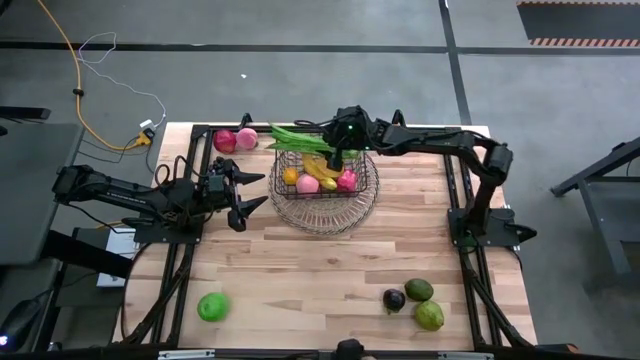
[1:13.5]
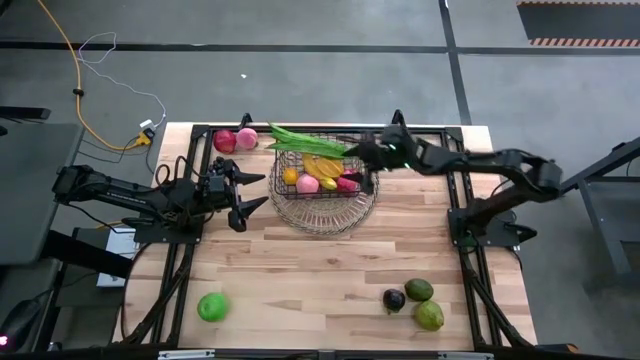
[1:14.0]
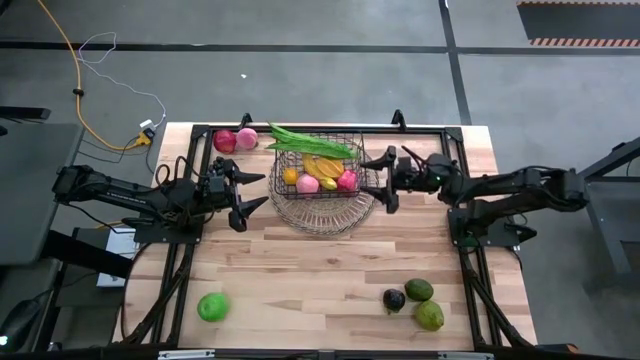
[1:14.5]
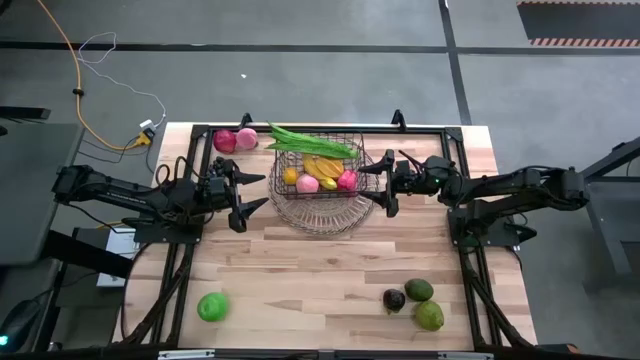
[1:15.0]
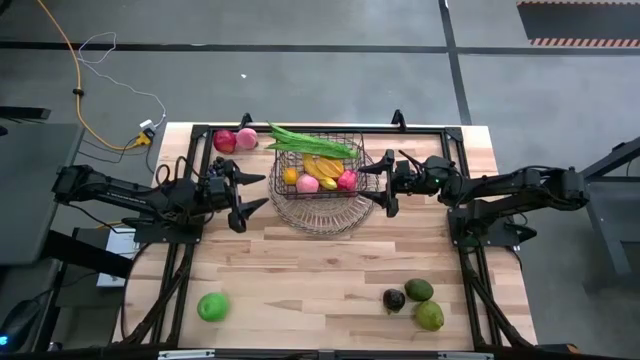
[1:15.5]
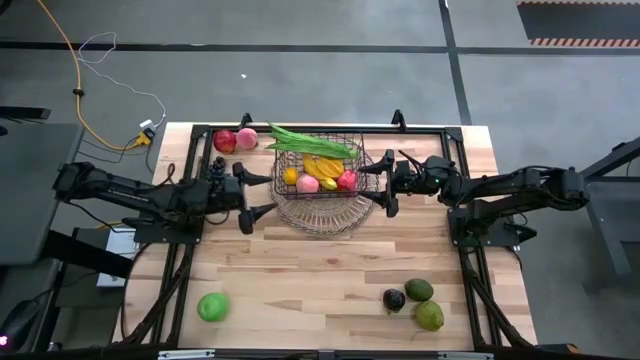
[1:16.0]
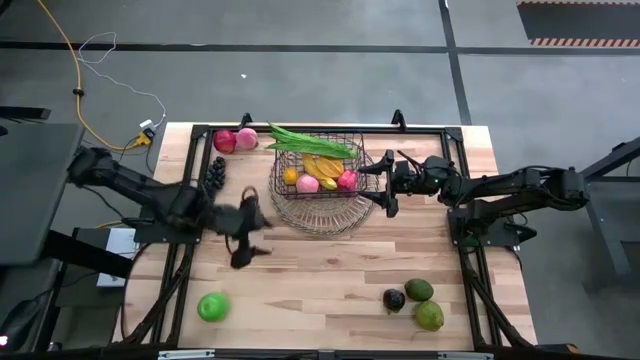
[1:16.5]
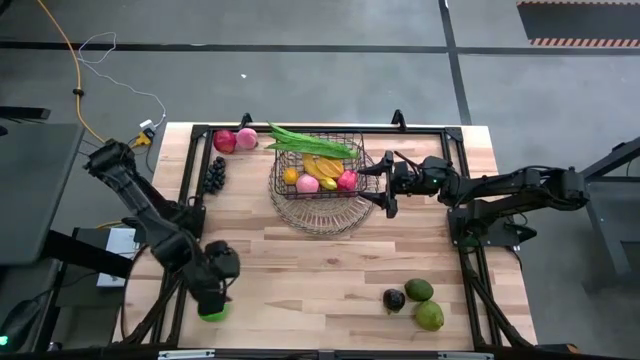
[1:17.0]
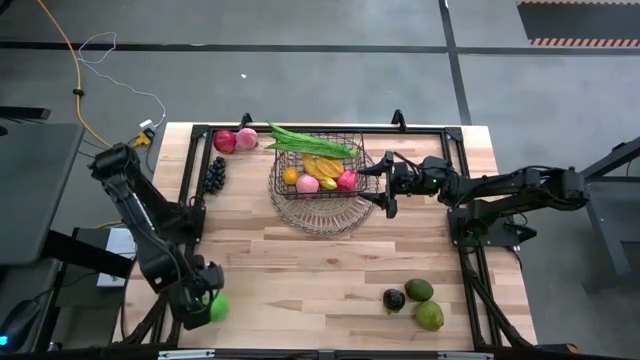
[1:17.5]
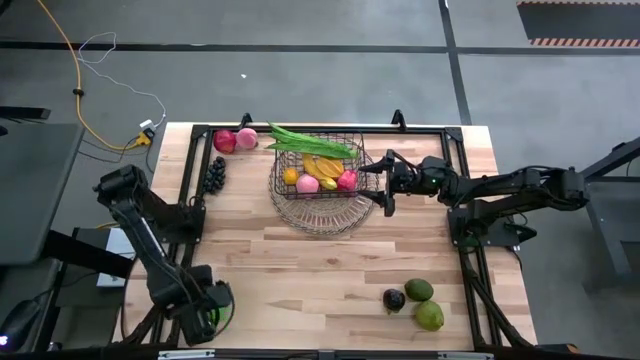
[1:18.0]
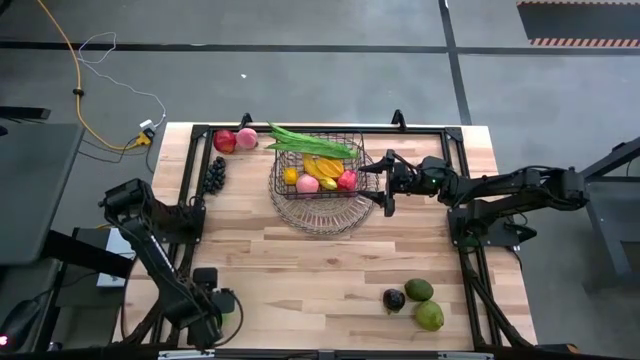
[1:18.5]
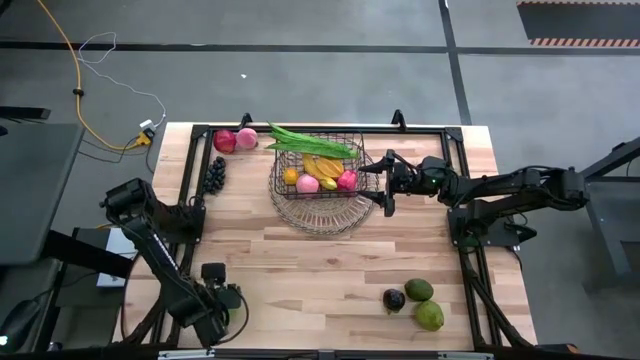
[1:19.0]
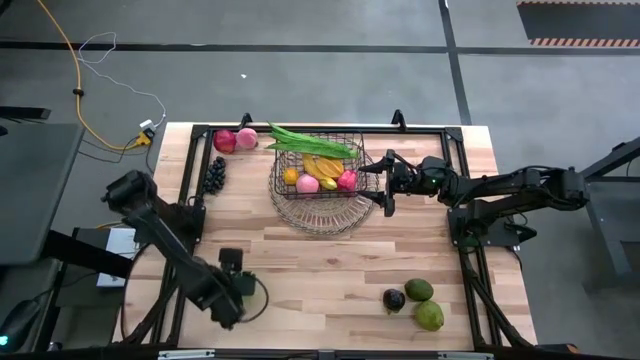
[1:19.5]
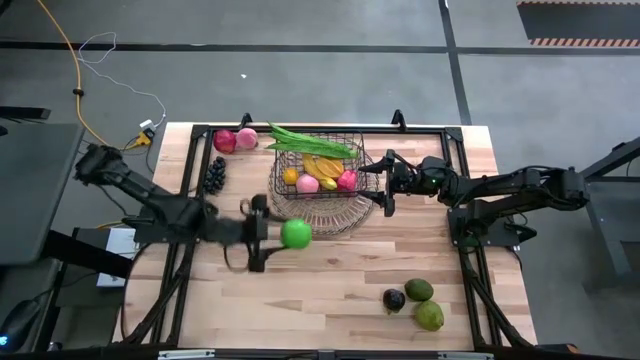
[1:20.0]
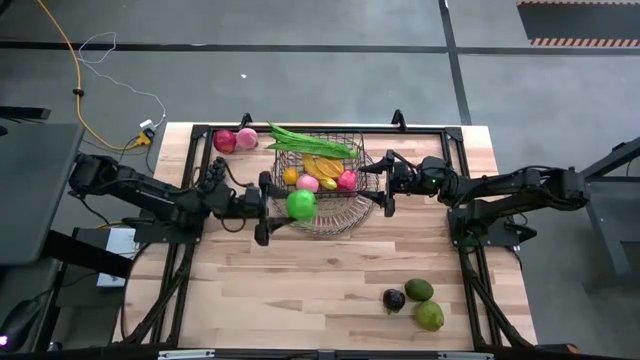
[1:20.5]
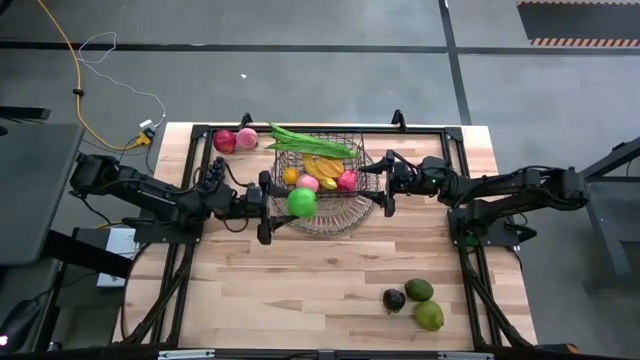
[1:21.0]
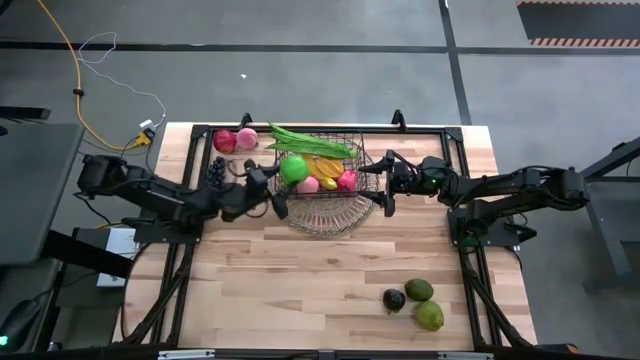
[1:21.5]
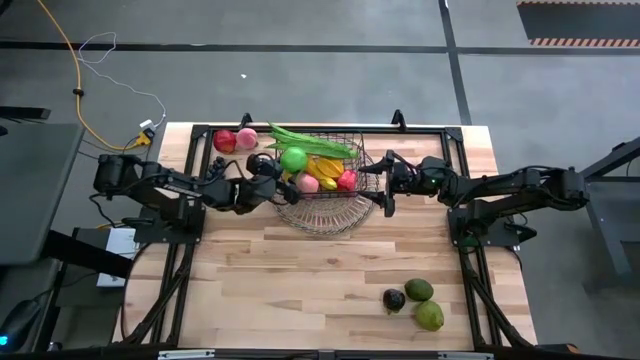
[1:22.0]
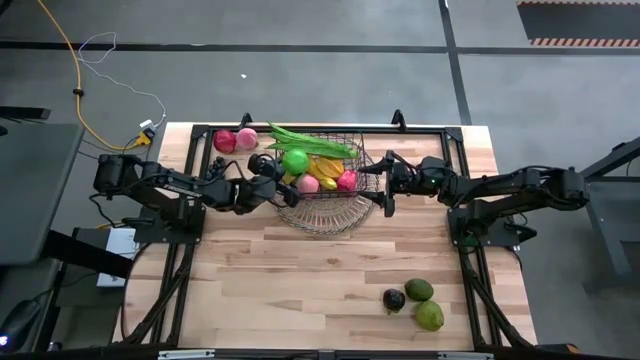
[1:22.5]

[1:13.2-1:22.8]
Task: Build produce basket
Put the apple into the wire basket

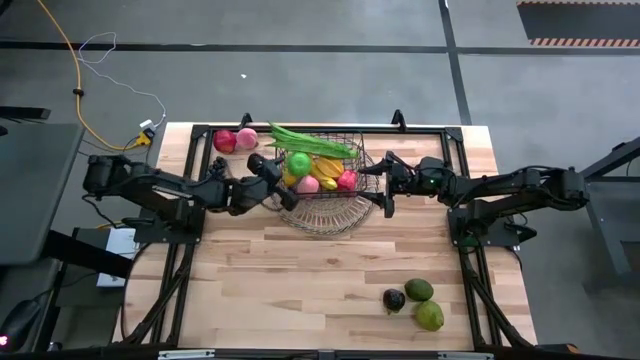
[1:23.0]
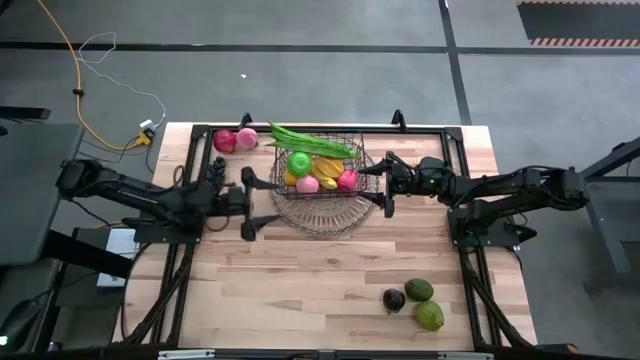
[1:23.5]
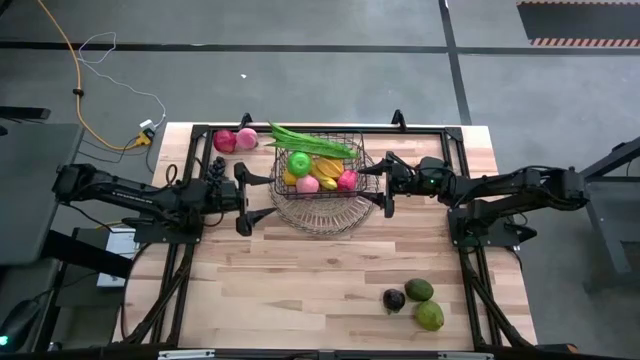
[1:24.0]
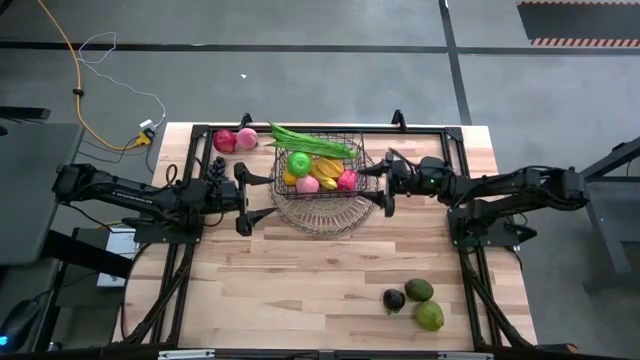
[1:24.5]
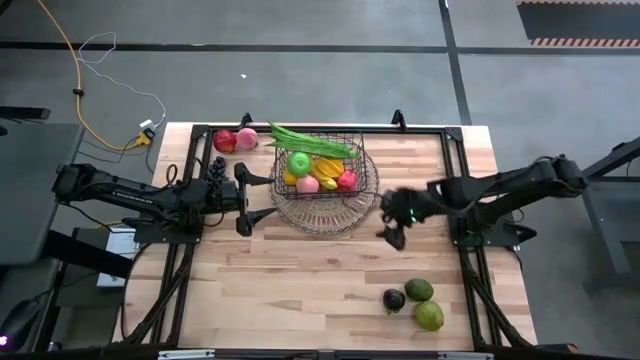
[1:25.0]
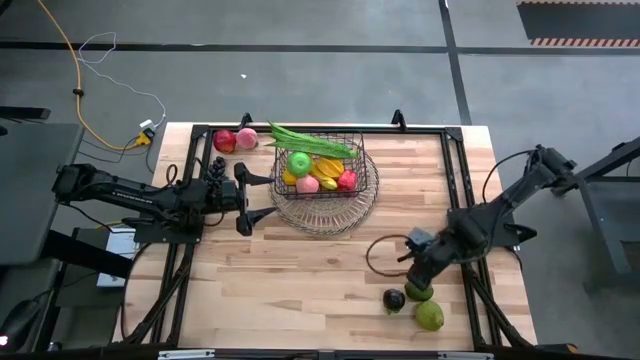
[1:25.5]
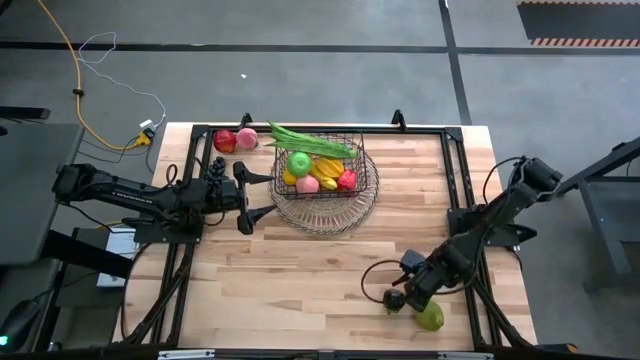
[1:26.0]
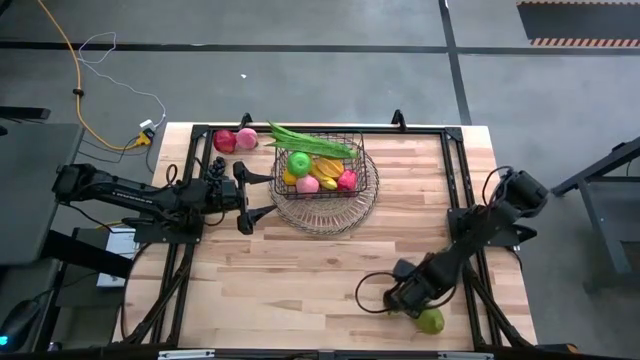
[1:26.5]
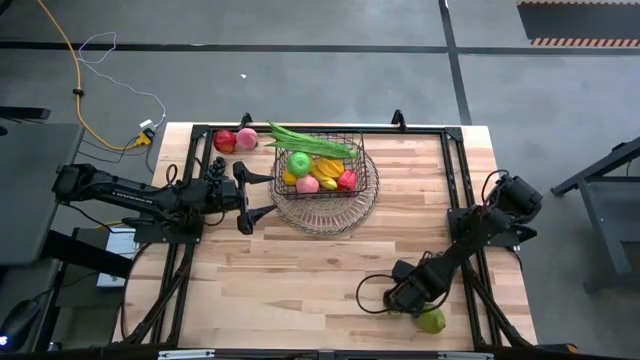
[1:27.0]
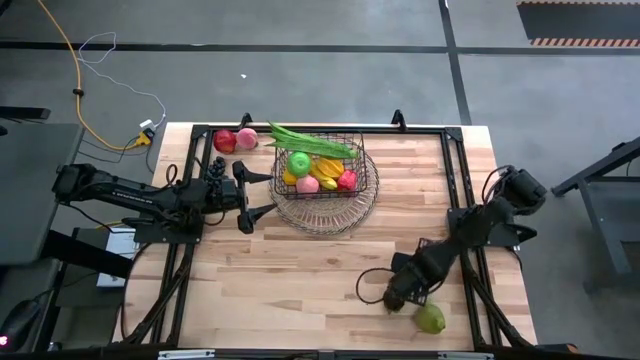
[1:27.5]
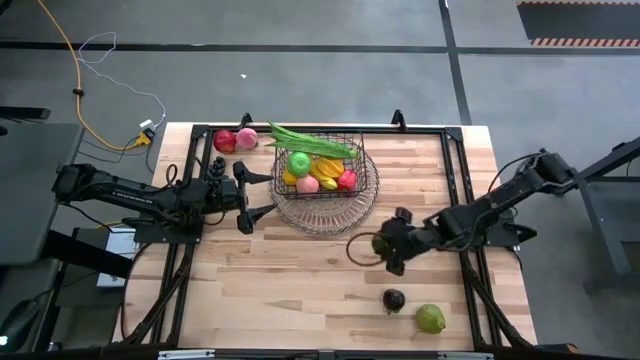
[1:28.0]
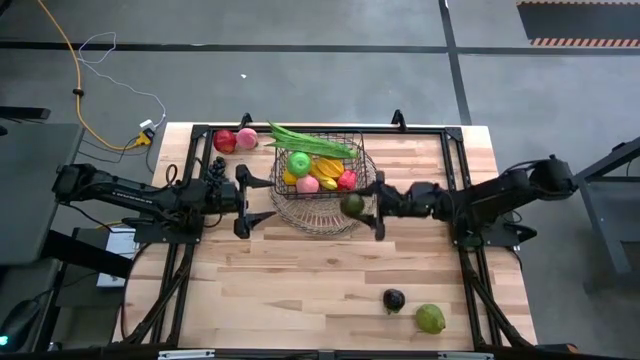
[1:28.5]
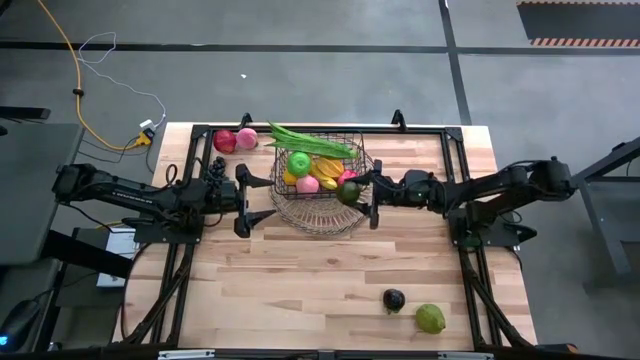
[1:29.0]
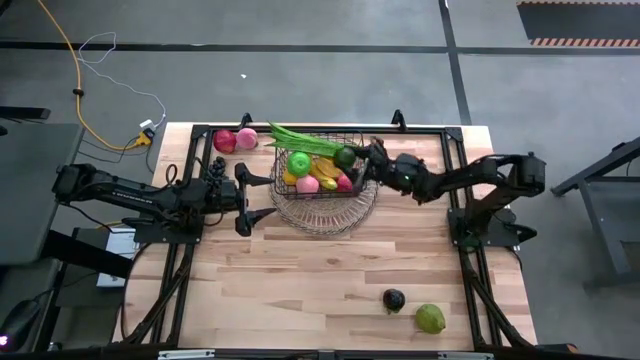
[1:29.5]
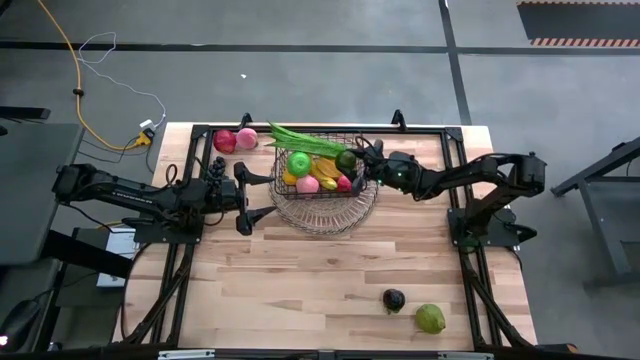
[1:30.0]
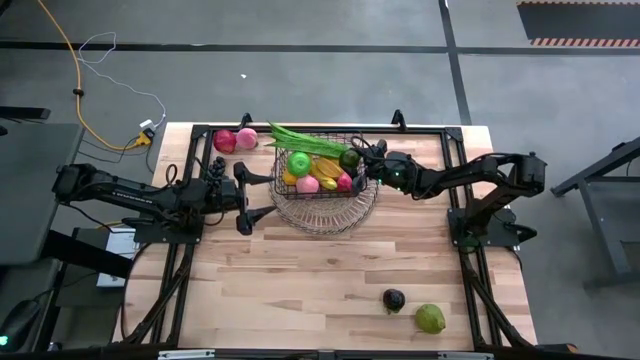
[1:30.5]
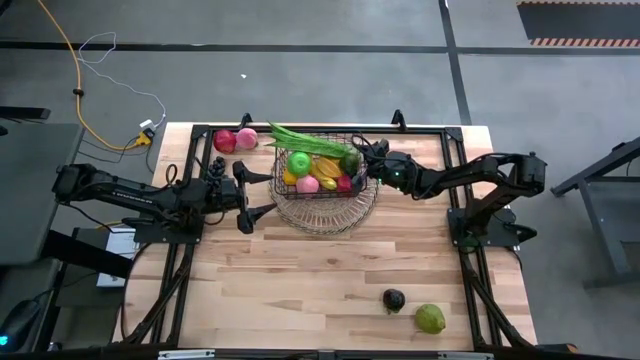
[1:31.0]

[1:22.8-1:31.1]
Put the lime into the wire basket

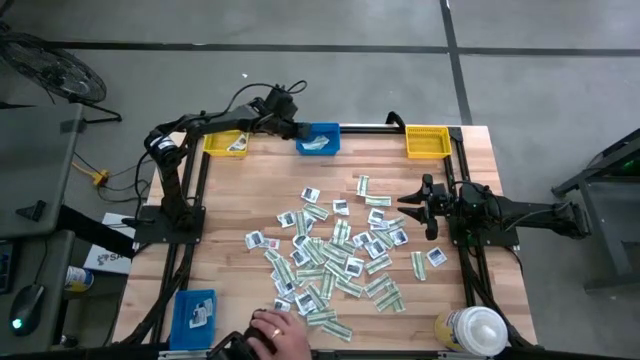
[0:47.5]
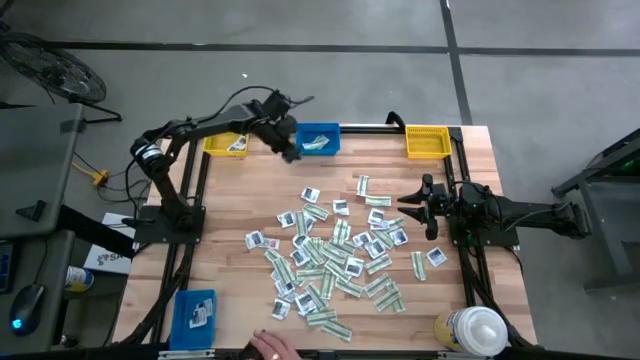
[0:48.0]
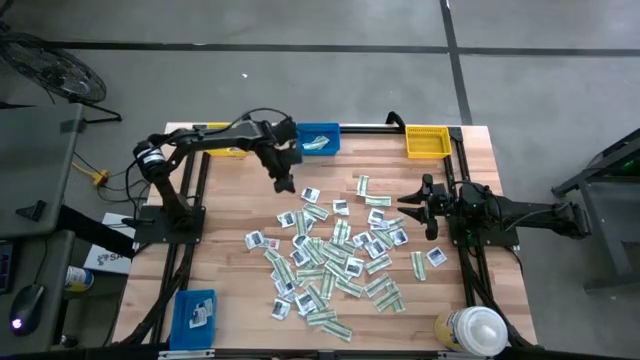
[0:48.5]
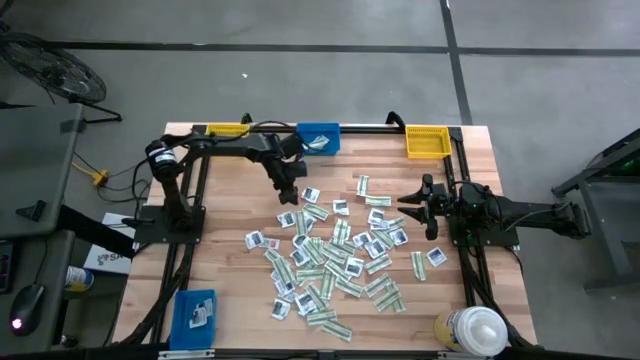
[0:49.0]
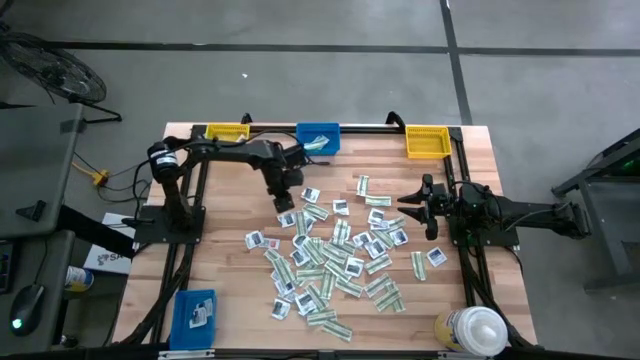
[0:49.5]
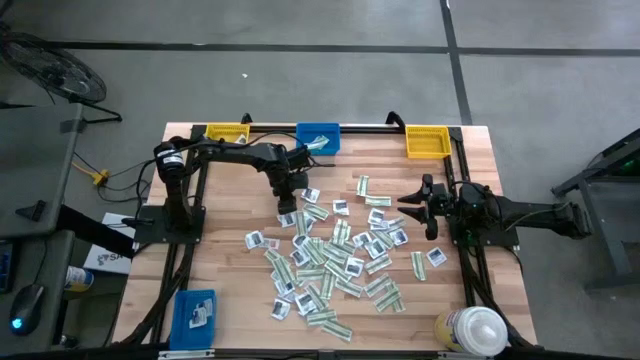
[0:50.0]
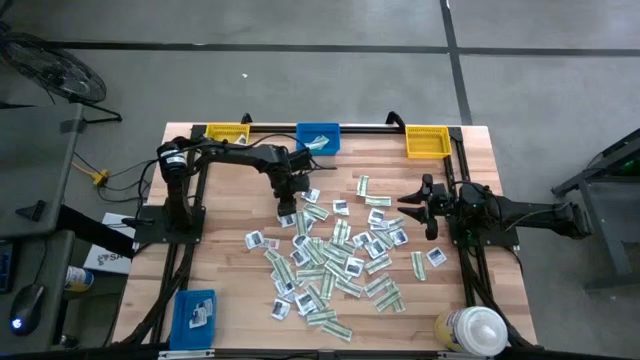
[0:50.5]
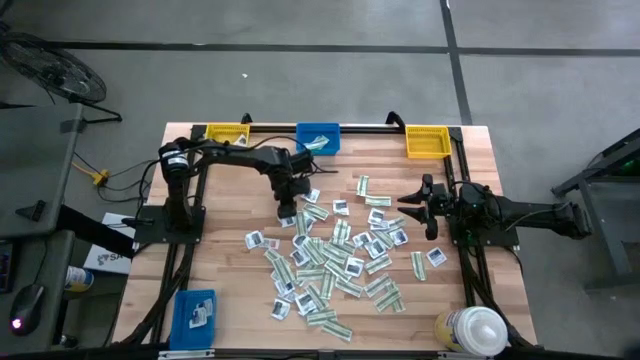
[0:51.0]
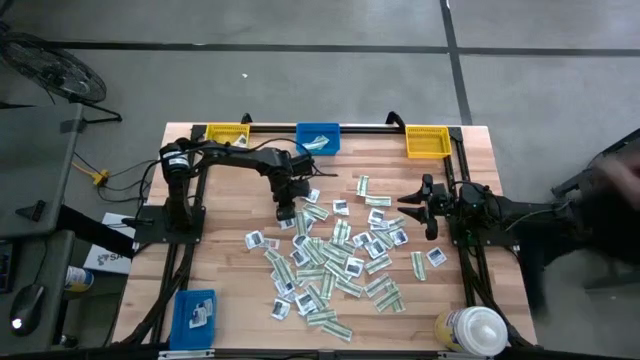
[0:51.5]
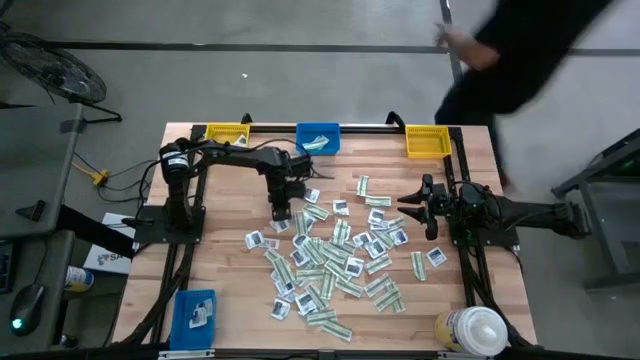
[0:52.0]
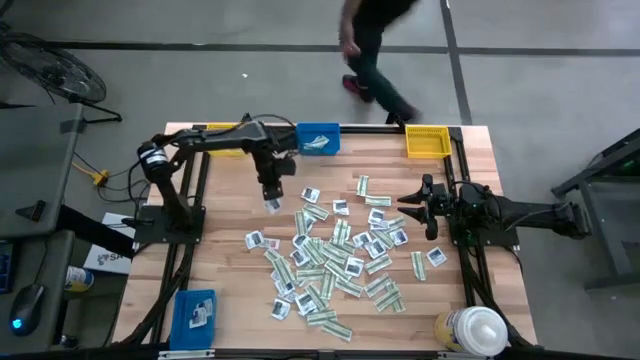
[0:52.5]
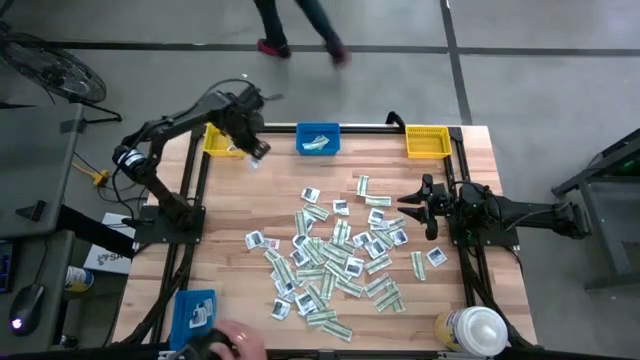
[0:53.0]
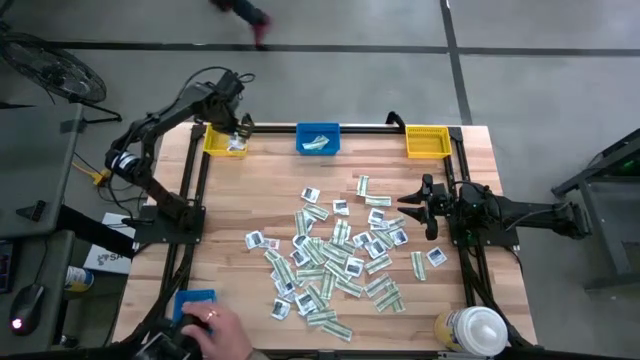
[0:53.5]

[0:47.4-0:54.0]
Task: Pick & Place First Aid Supplies
Put the gray towelette pack into the left yellow bin
